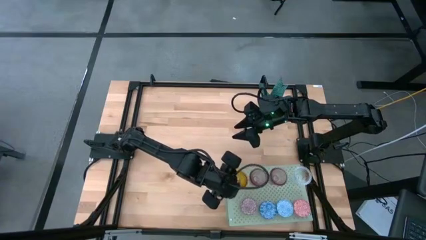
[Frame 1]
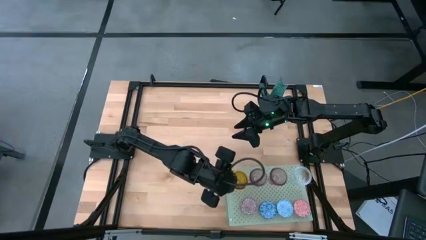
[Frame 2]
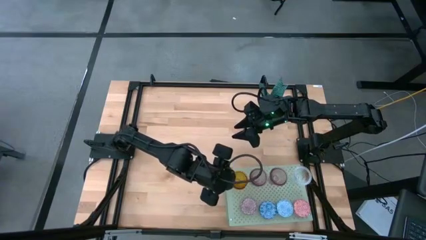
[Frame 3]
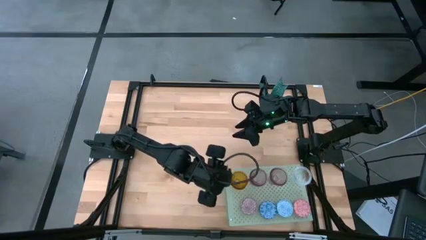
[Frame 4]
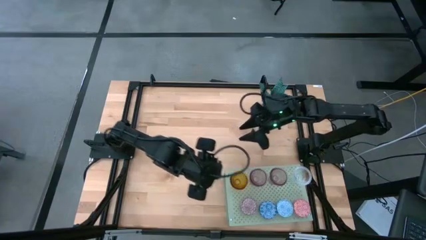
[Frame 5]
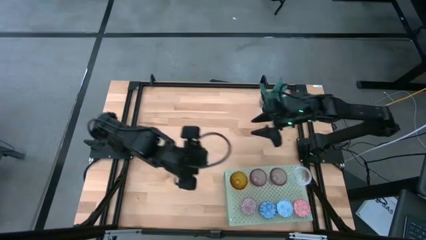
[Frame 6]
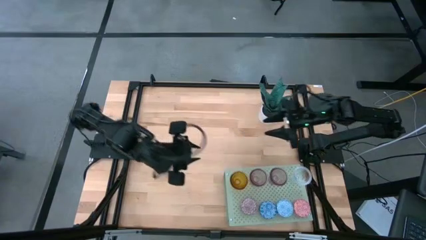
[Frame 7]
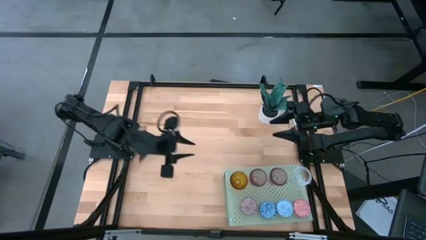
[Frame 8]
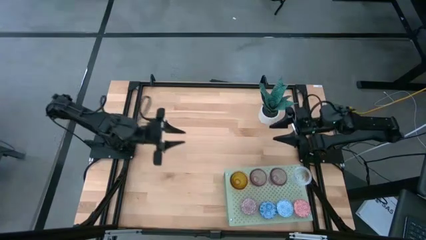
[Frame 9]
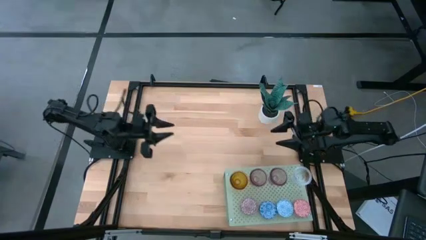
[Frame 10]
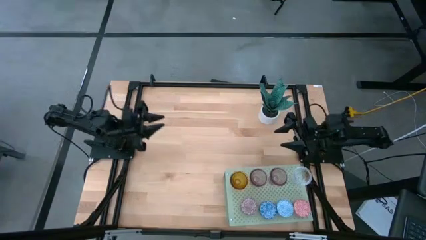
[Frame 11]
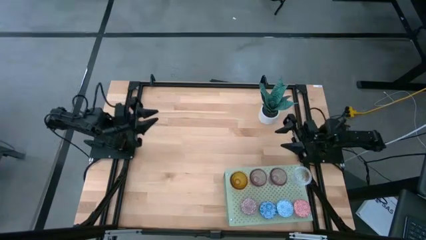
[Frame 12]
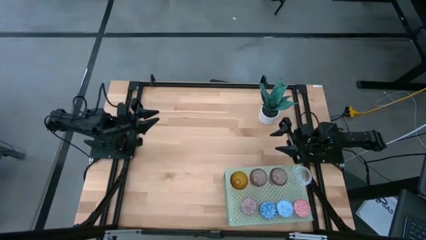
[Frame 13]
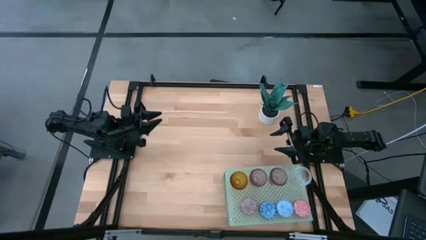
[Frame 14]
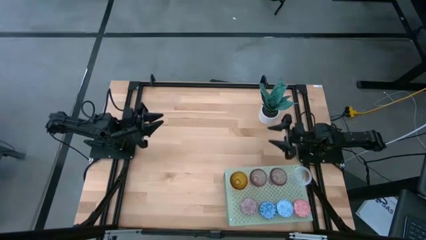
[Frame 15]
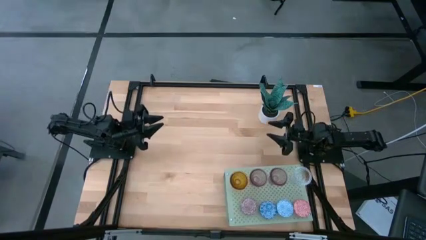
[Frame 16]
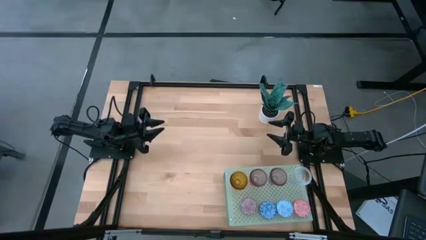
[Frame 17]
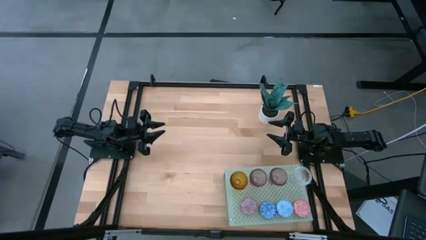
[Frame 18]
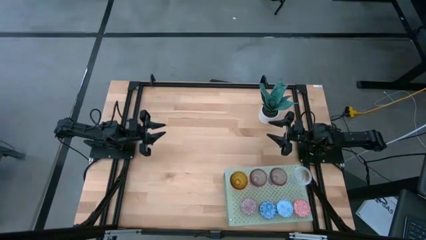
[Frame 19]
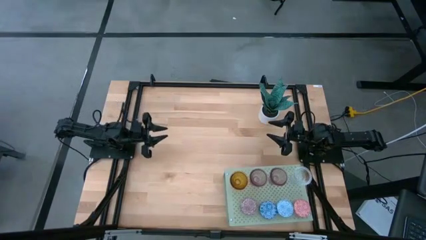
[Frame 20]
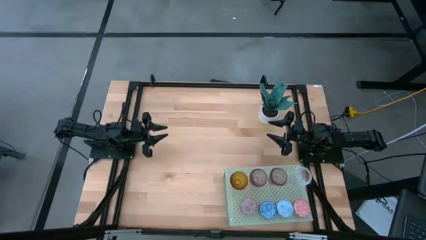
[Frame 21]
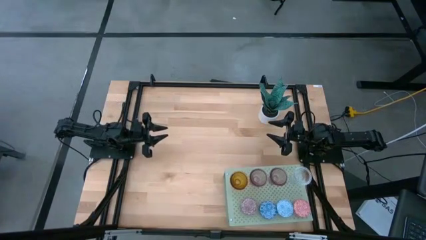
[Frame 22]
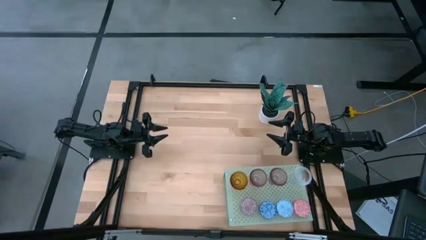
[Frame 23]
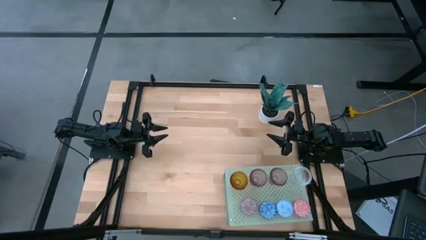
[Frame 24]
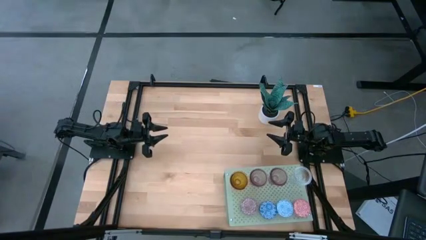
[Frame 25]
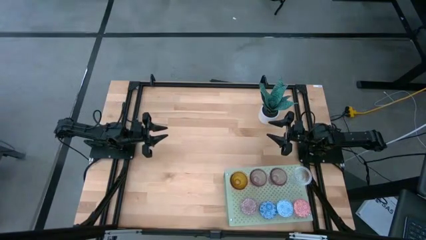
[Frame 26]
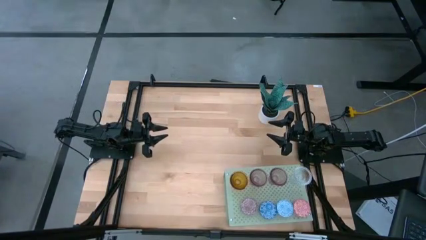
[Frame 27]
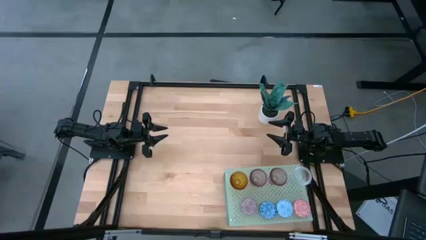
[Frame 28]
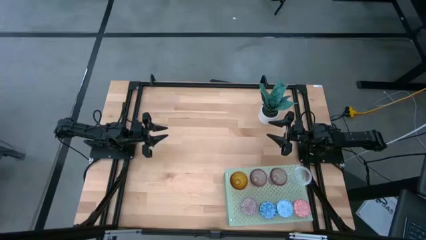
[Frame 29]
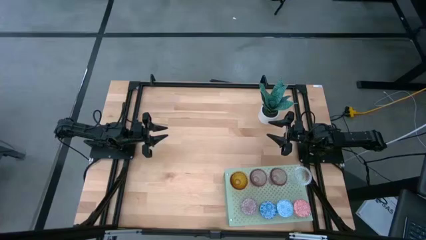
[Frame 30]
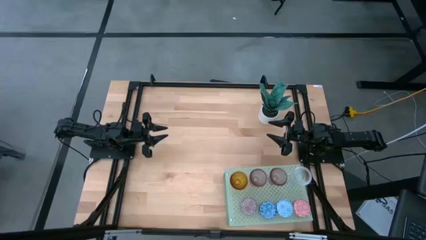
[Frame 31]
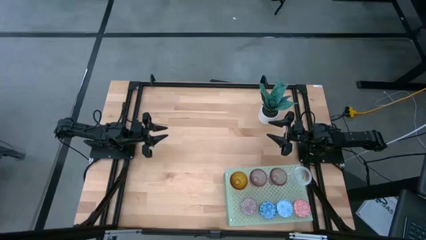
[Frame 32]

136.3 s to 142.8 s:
Task: Pick & Place candle stick holders
Return to Home Position

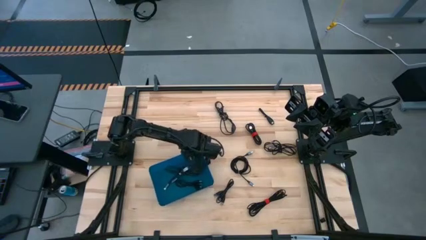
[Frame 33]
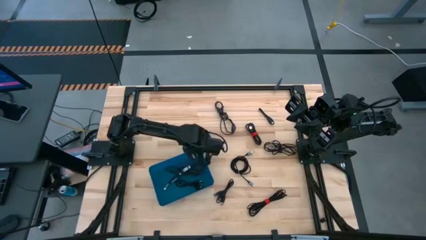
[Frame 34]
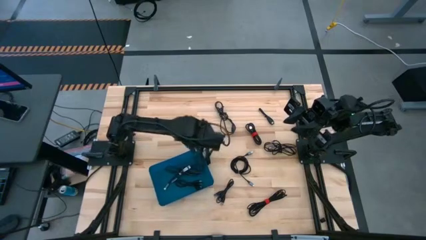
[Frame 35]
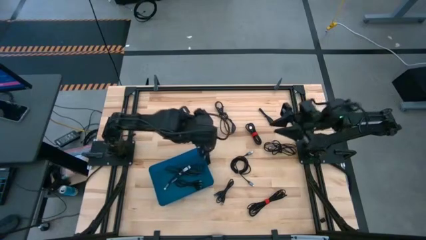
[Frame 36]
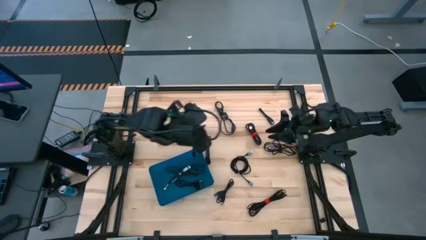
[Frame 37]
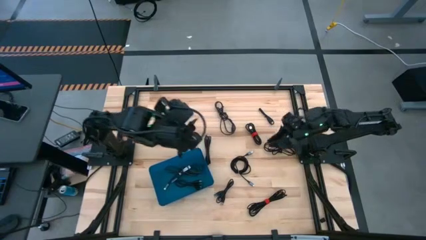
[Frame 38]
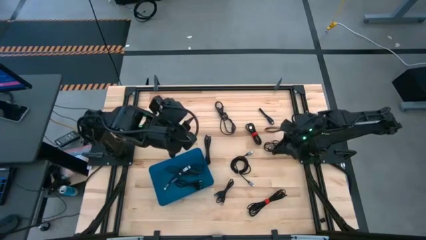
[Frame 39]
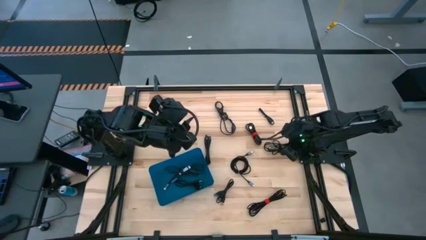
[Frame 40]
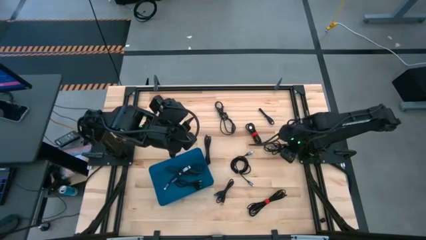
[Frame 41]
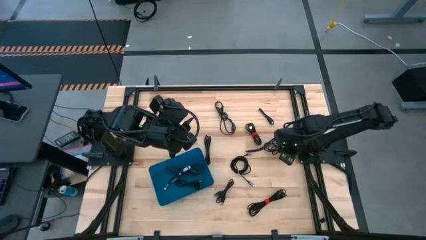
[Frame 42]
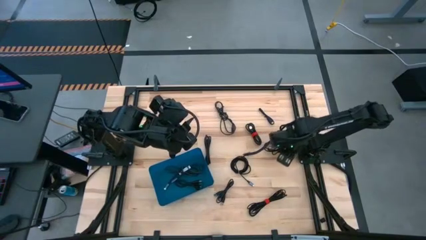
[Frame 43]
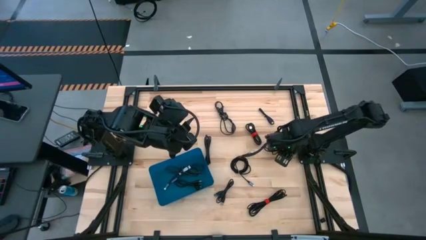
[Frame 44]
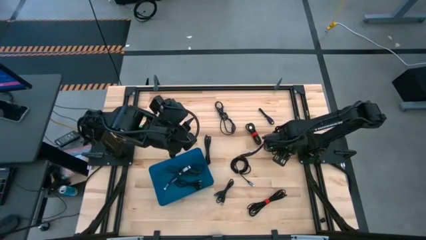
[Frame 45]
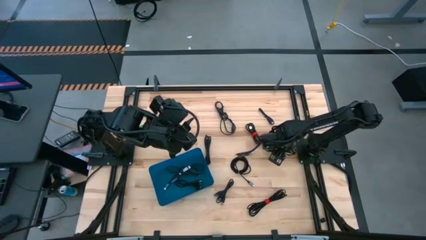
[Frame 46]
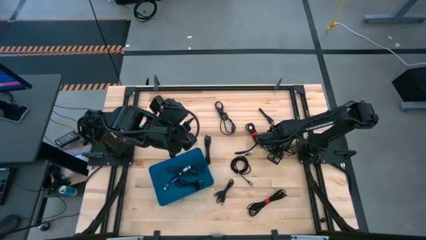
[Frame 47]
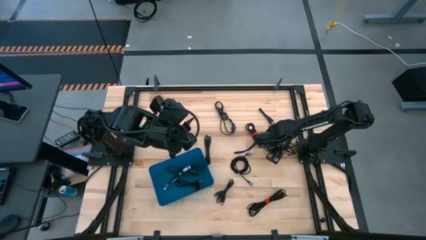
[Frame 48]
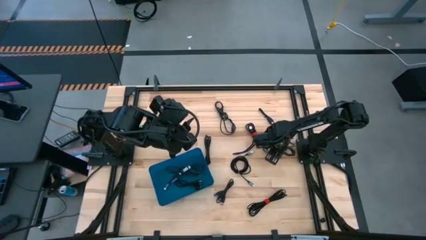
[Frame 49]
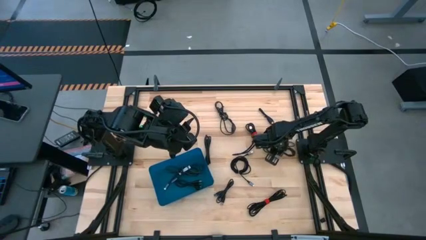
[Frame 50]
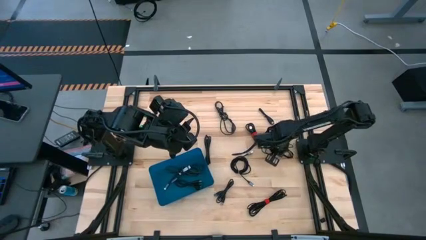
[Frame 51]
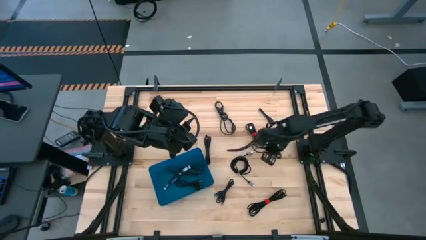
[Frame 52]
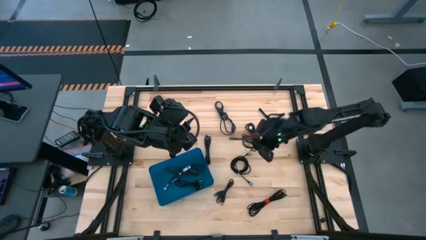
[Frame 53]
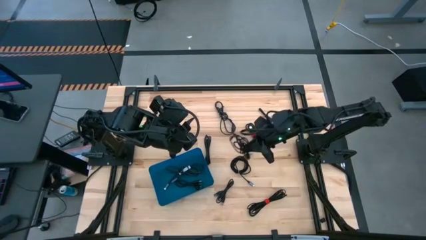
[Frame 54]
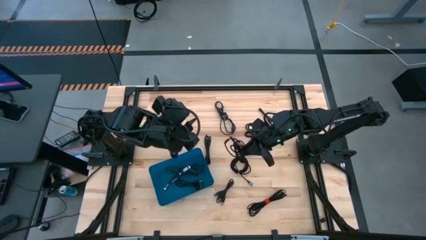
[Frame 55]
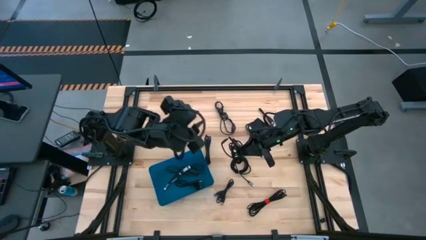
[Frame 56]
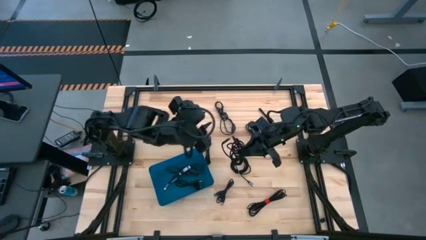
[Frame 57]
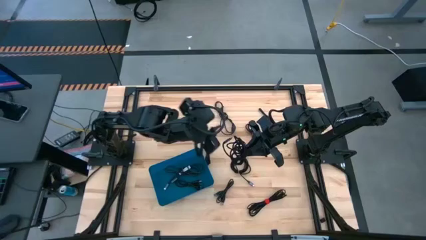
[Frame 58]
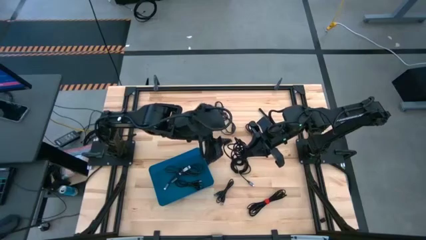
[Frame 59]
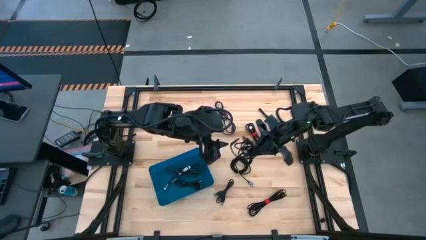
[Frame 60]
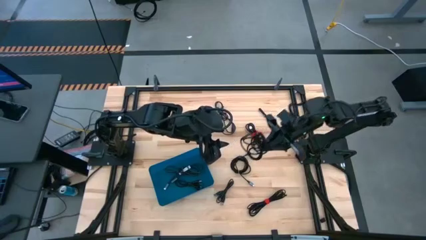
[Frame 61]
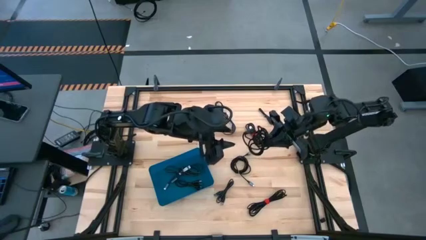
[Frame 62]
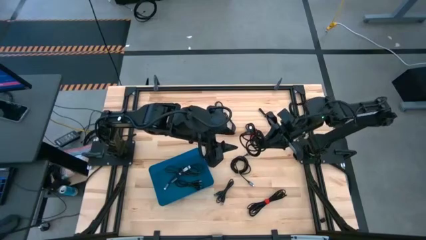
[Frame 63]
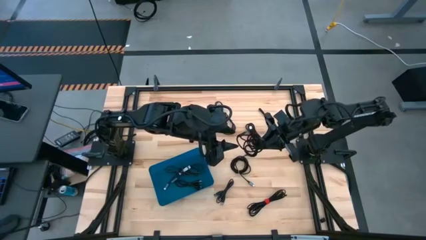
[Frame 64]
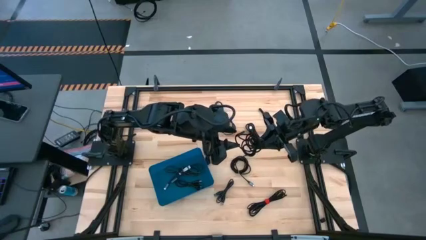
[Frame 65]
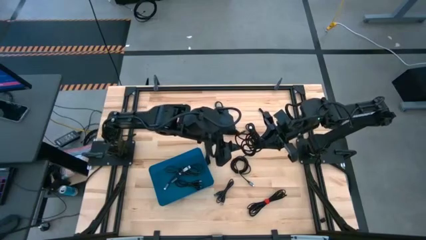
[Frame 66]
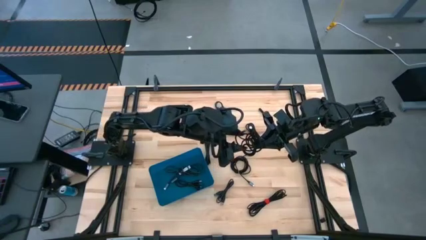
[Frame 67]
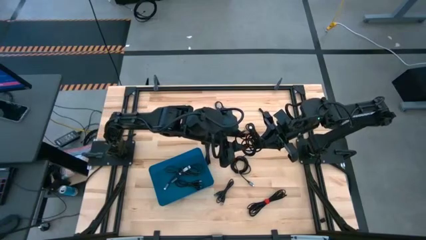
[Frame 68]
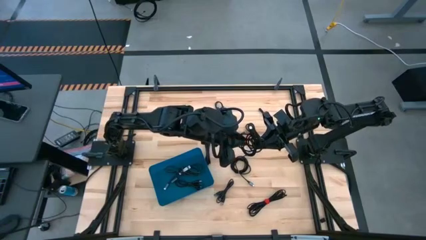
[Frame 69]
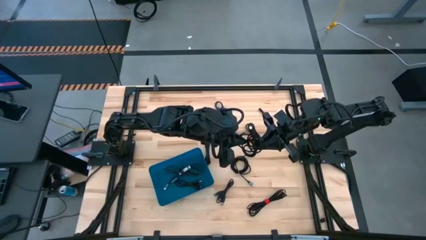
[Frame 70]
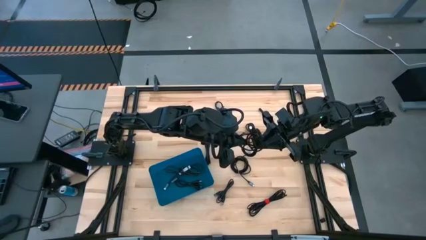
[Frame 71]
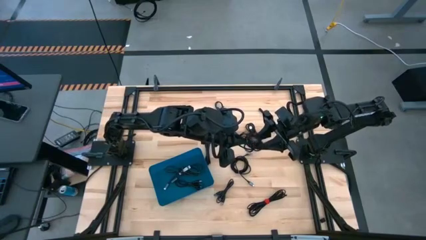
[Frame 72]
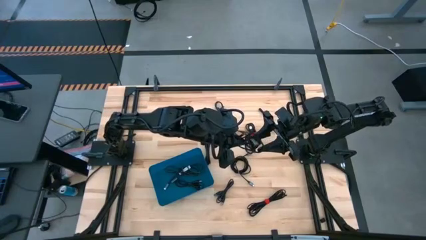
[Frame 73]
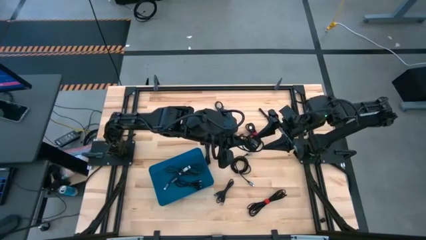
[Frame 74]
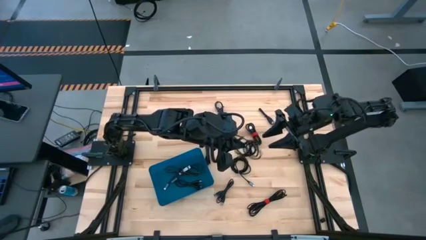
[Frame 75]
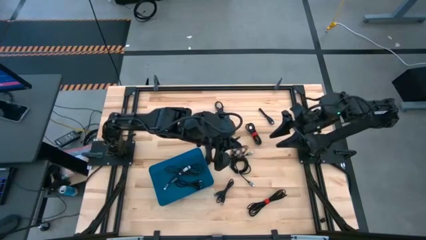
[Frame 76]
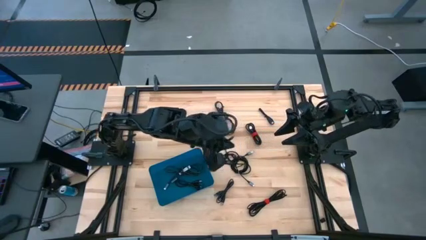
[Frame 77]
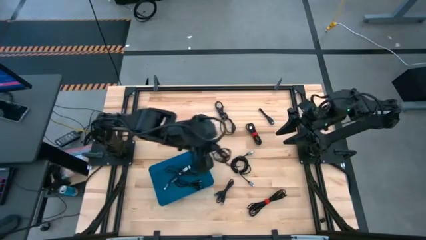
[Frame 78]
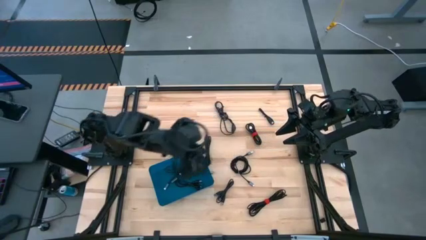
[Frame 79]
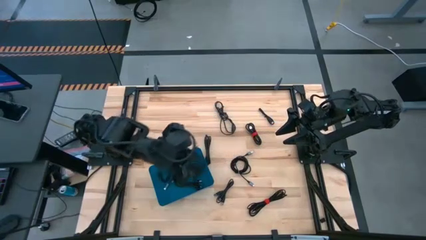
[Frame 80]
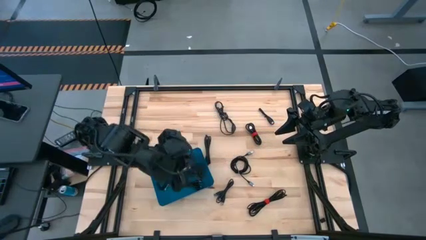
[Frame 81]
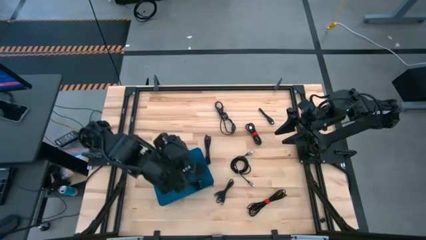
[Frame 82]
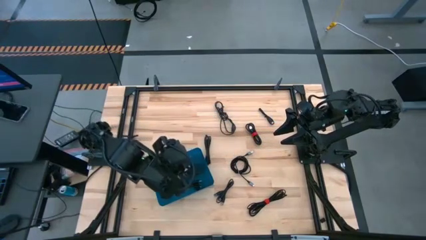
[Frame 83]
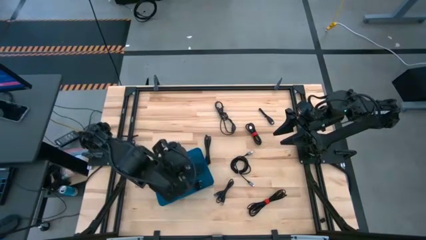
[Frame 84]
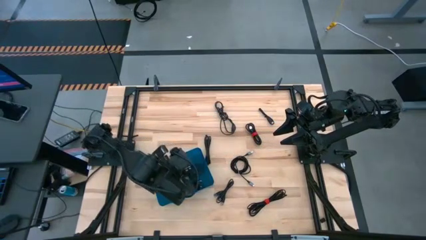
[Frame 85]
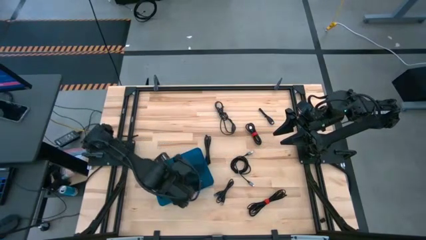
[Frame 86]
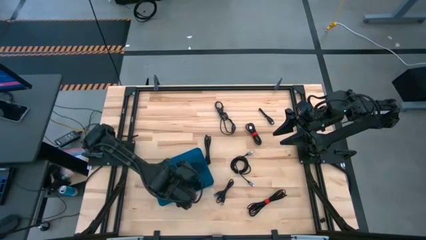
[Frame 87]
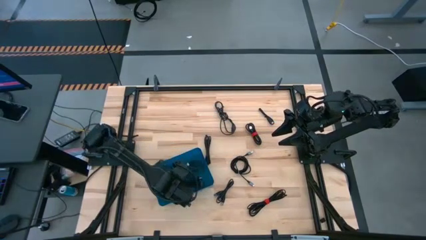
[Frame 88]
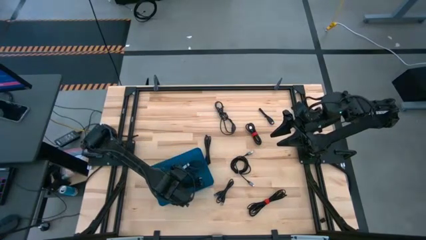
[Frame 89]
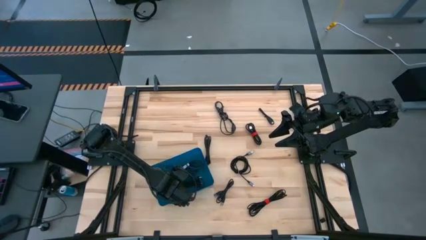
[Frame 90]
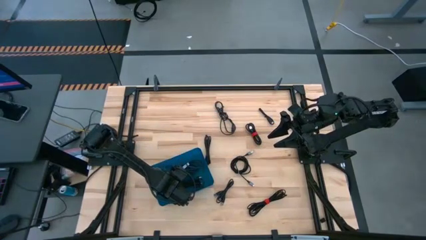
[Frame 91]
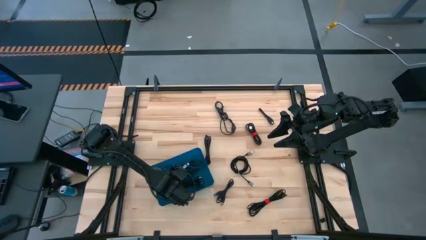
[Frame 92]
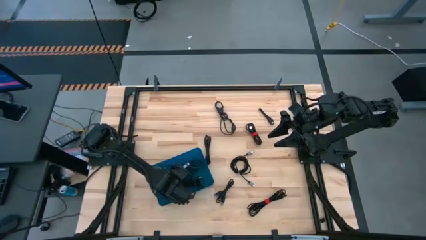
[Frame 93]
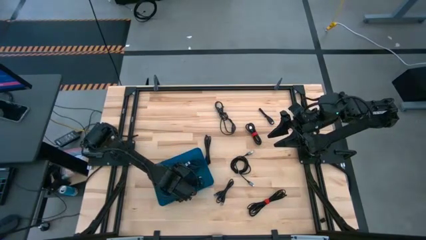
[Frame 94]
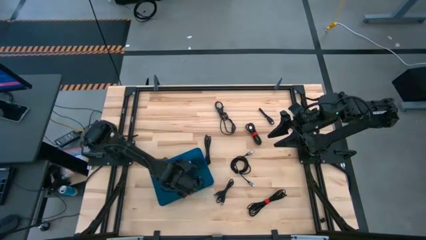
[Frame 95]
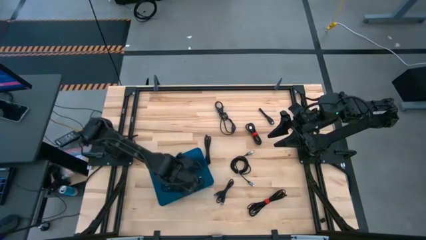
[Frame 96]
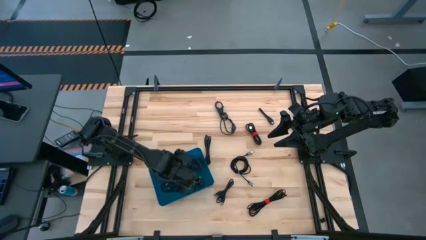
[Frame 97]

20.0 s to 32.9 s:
Task: Pick and place USB-C Cables
Put the black charger cable into the blue bin
